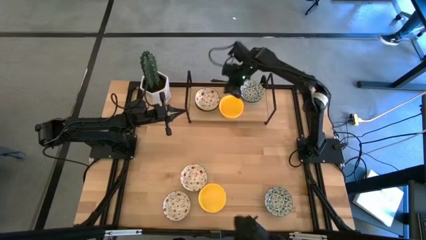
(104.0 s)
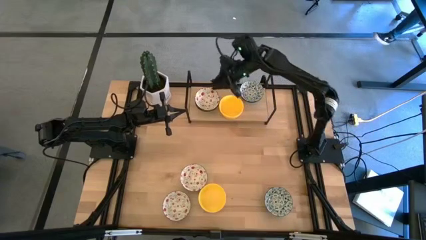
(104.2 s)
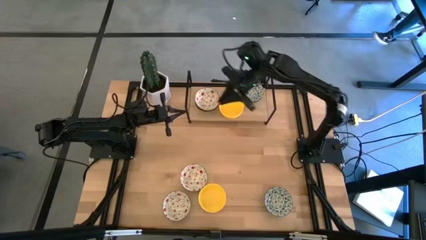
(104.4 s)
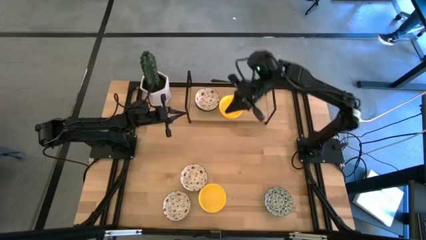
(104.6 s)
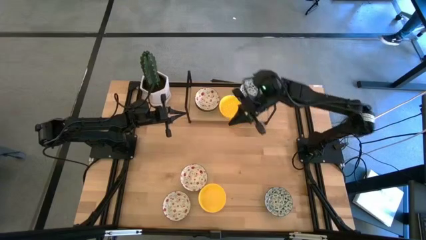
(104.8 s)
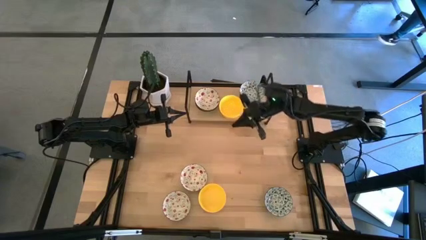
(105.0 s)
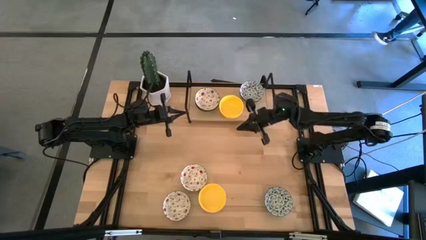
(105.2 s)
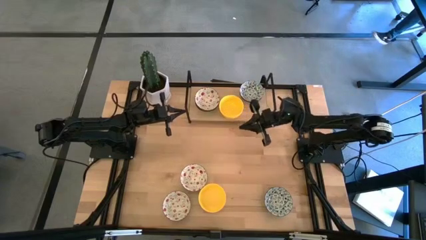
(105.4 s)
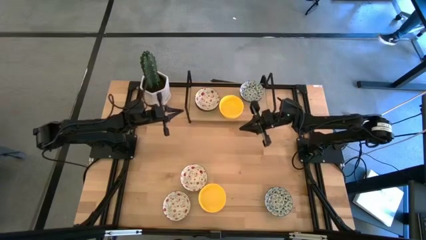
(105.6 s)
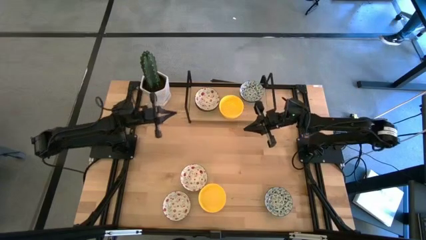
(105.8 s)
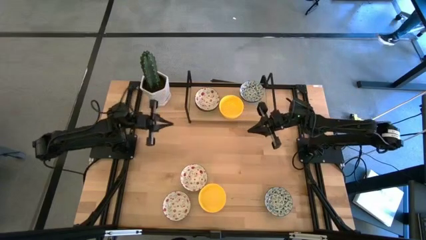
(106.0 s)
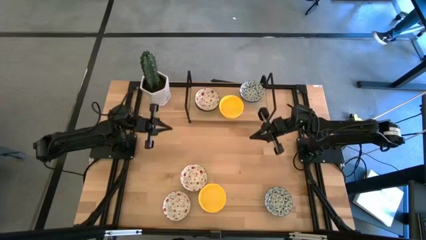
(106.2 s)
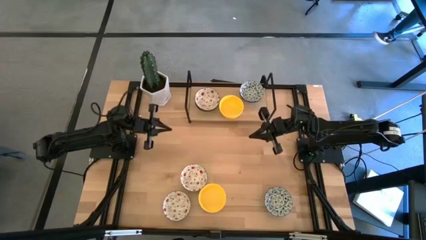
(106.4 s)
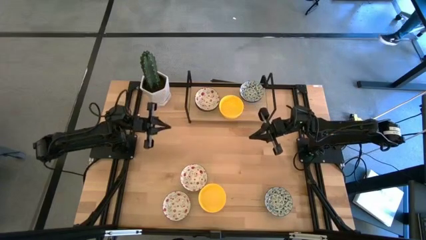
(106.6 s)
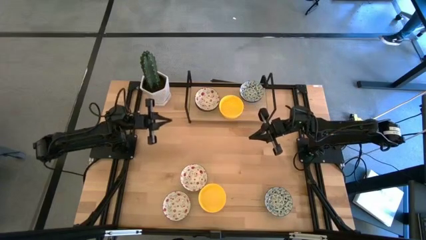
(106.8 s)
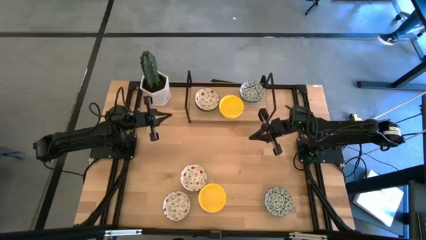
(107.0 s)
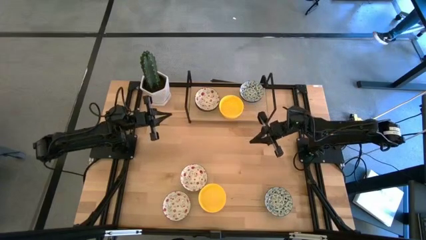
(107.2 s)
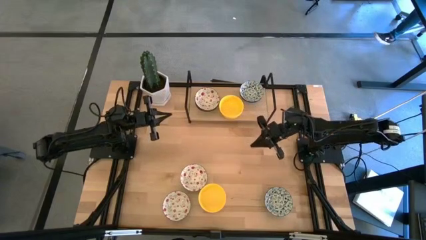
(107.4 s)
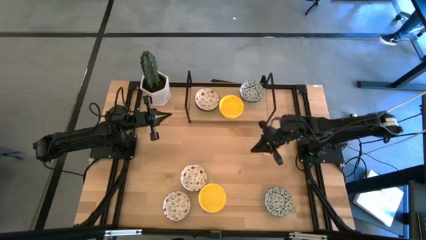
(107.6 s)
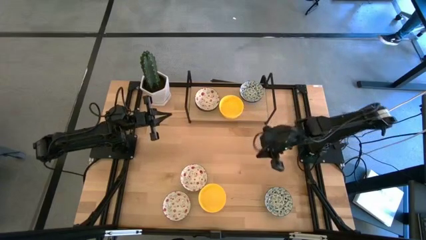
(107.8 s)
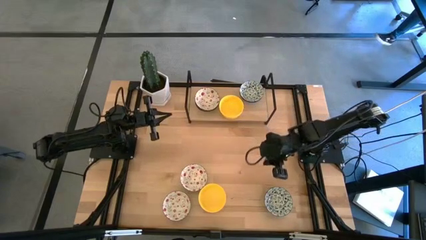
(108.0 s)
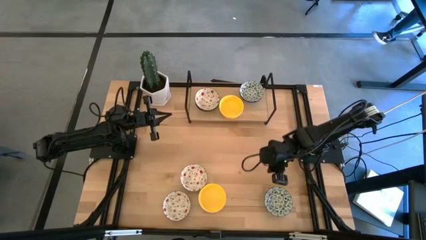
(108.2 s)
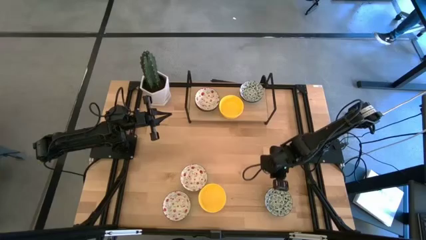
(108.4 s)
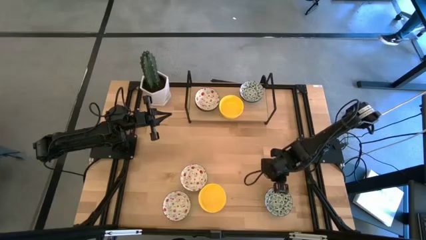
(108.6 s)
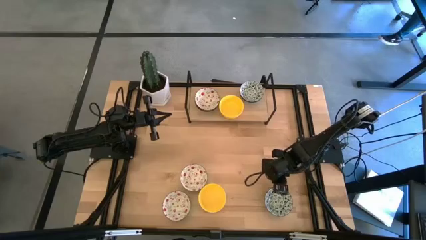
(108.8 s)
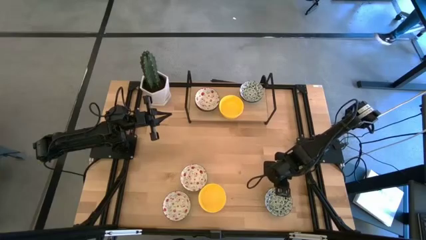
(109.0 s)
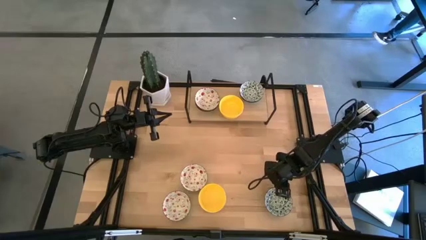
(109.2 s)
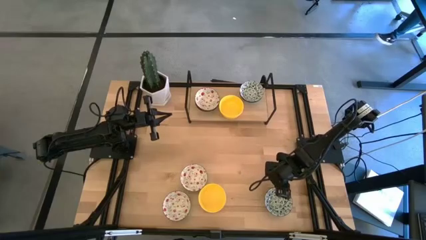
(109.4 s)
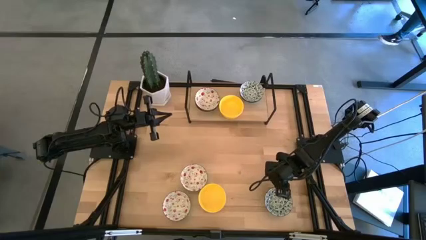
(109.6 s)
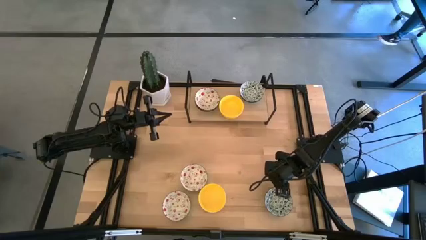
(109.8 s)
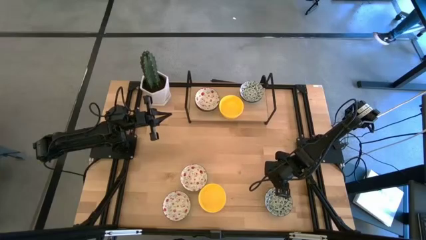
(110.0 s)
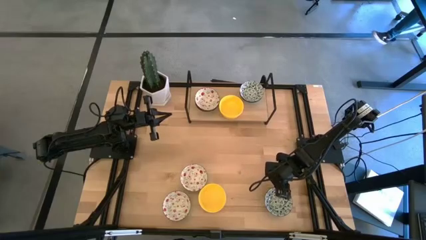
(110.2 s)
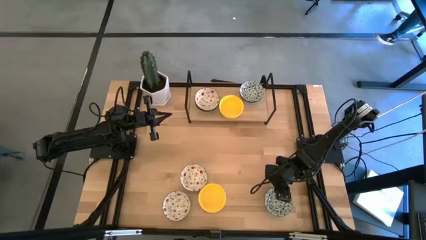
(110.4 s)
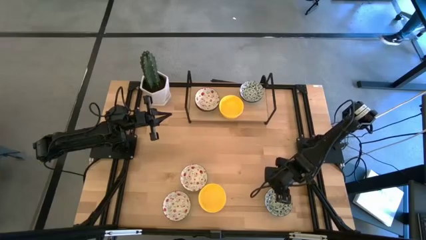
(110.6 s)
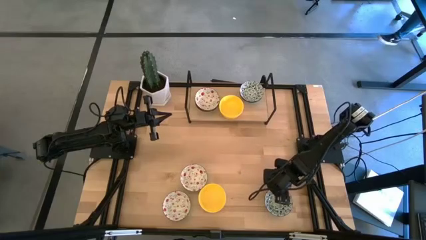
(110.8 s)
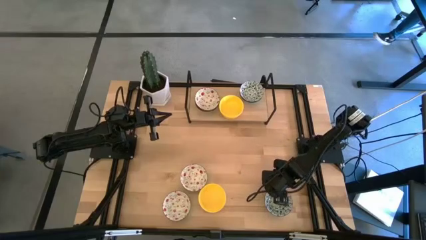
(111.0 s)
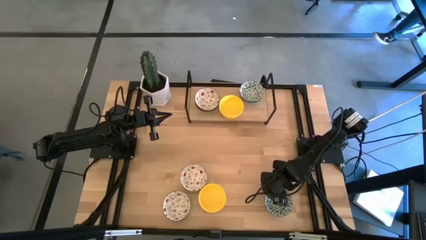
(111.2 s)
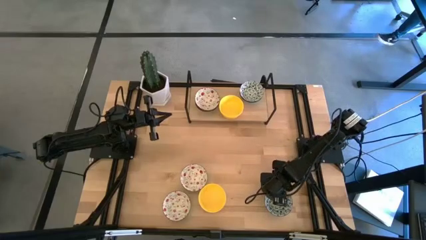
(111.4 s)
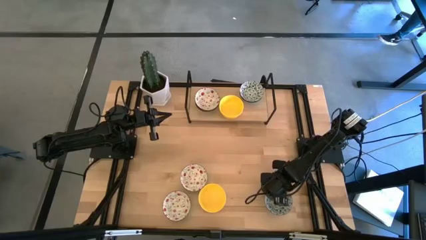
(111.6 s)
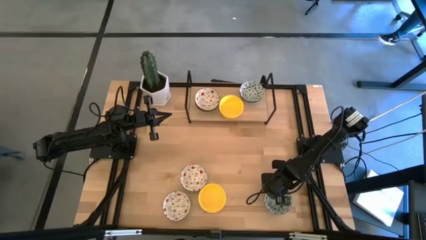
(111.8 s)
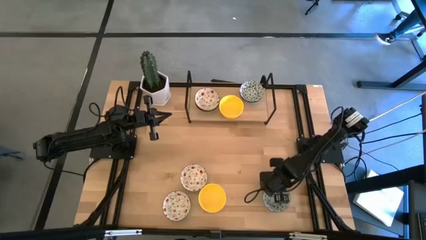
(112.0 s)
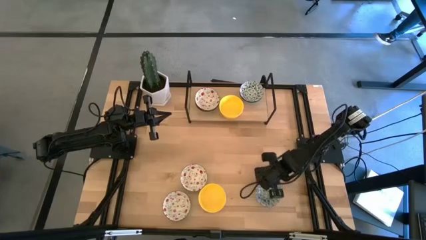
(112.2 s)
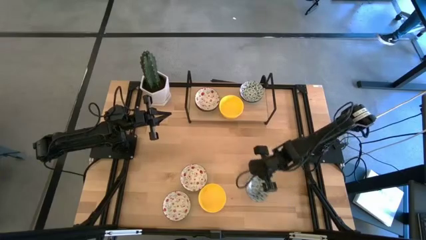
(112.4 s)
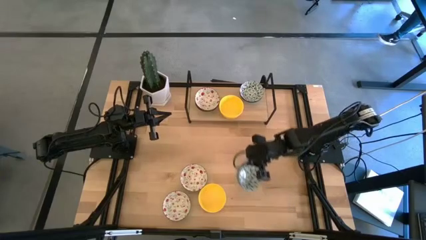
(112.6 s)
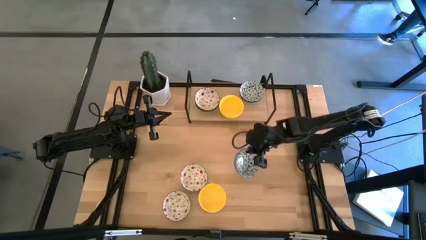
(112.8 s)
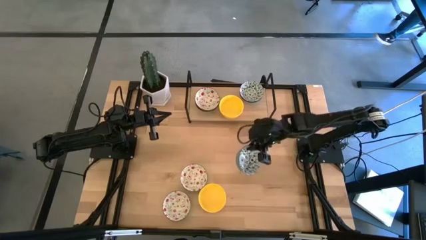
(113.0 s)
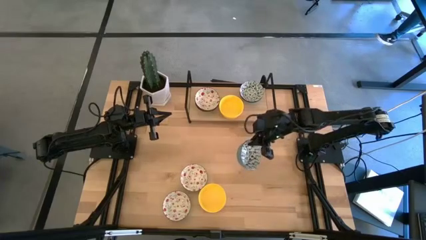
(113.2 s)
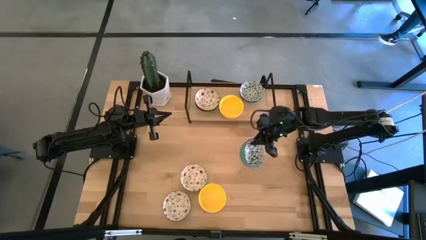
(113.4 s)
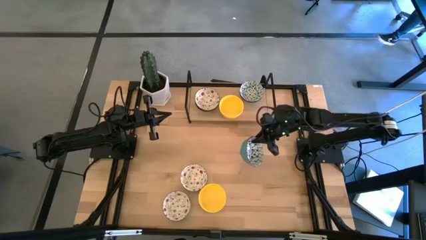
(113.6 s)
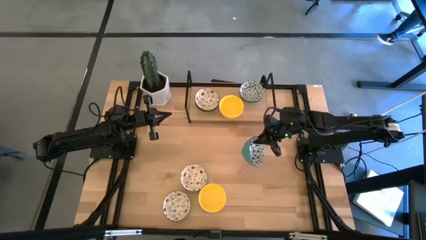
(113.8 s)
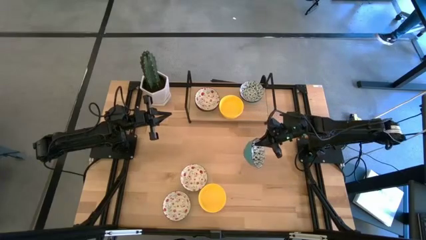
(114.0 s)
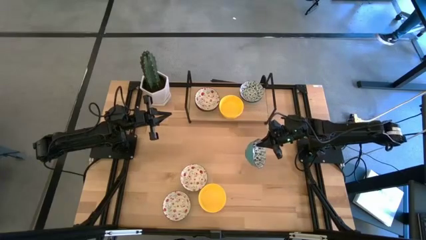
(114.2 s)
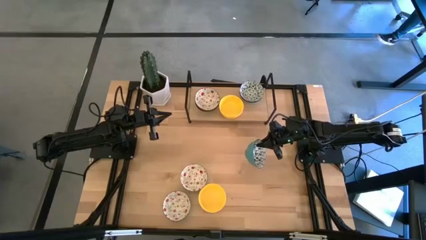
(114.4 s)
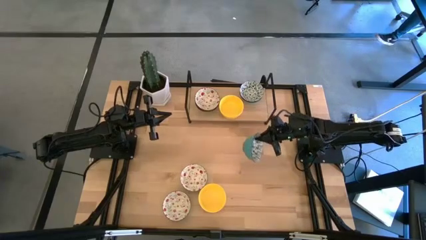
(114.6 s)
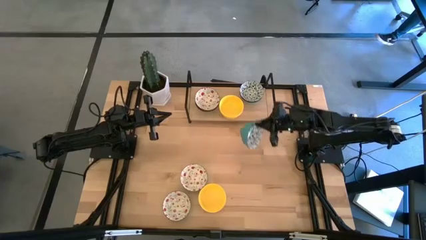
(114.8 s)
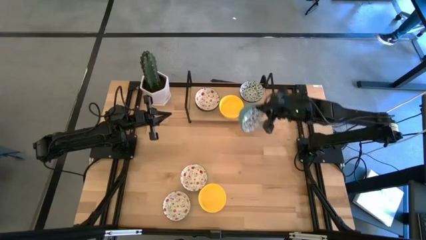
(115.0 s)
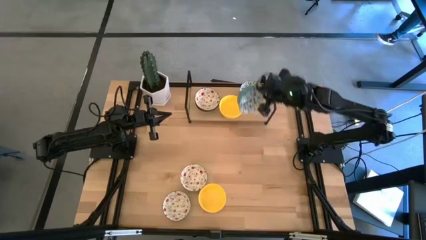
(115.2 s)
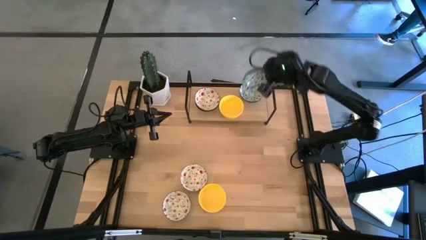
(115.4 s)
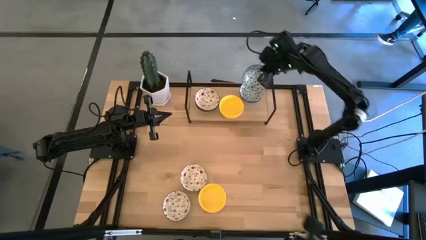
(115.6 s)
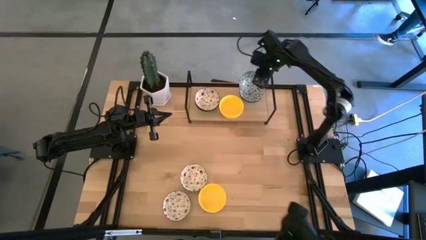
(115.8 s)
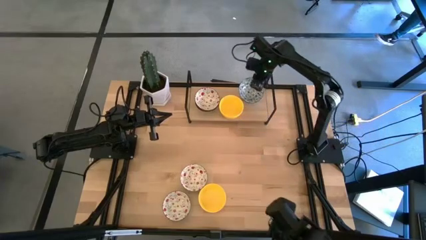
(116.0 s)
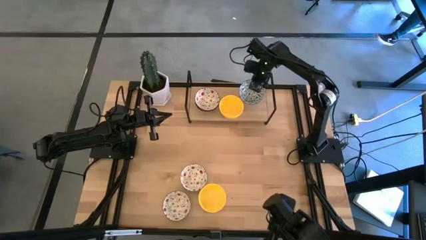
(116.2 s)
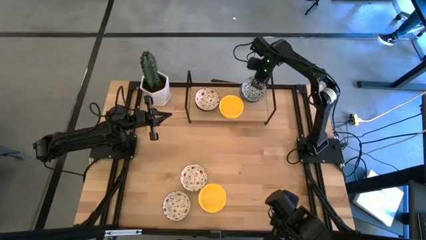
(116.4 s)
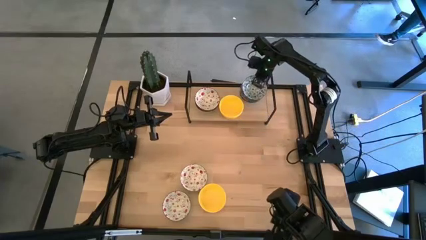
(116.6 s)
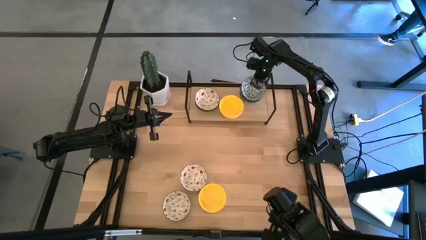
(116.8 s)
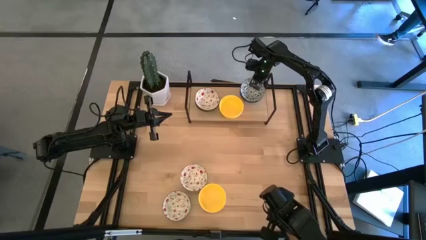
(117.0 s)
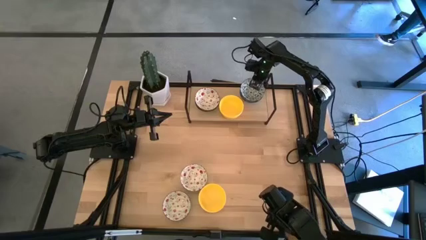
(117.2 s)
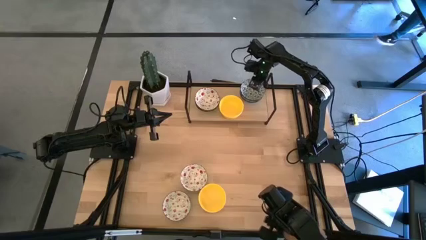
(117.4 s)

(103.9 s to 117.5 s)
Task: Pick & Place Mini bowls
Stack the blue black bowl on top of the blue black bowl on the shelf
